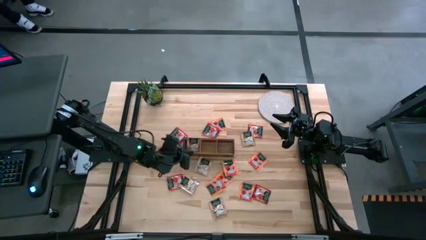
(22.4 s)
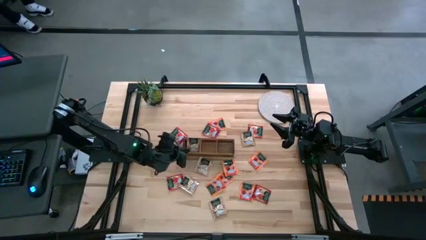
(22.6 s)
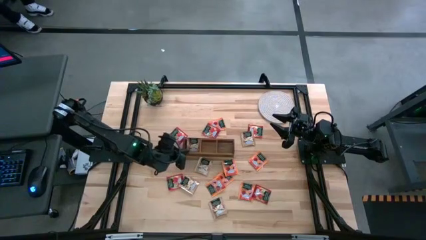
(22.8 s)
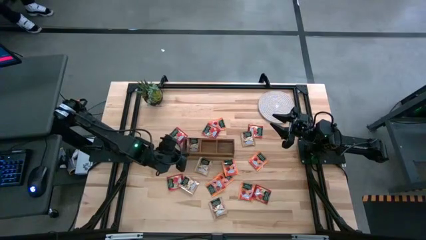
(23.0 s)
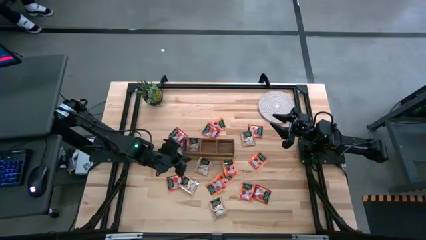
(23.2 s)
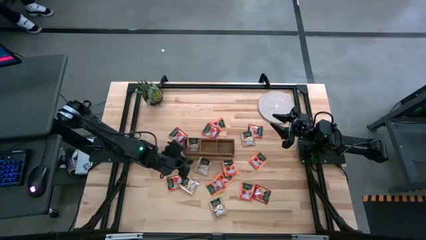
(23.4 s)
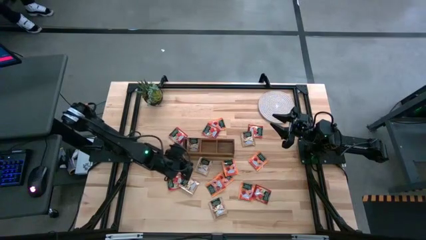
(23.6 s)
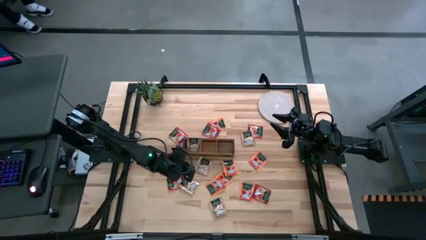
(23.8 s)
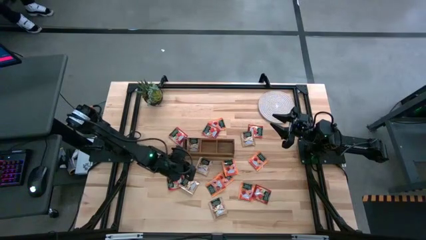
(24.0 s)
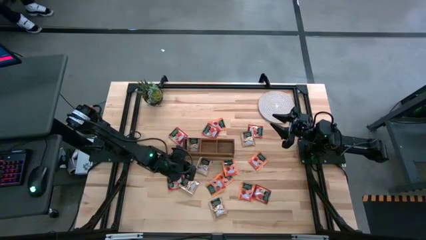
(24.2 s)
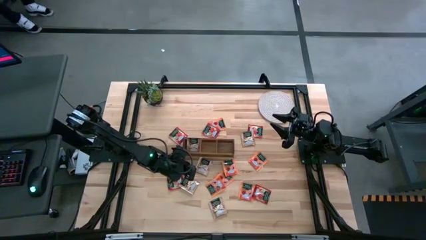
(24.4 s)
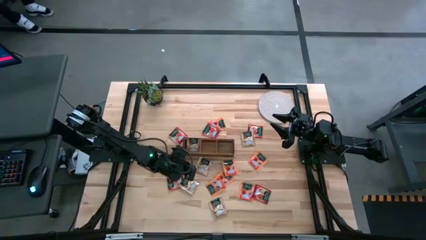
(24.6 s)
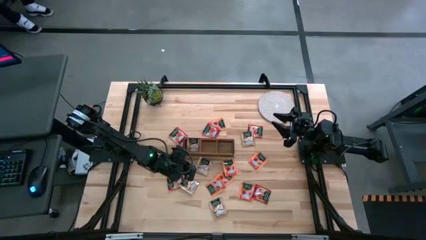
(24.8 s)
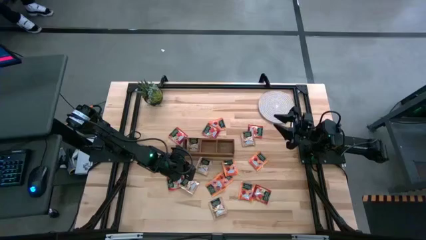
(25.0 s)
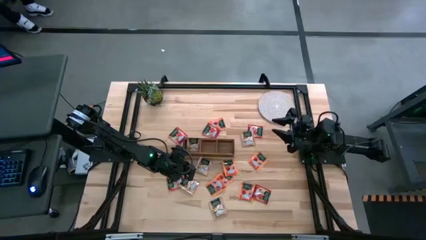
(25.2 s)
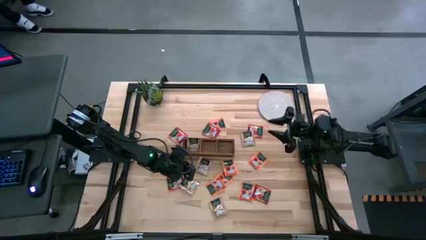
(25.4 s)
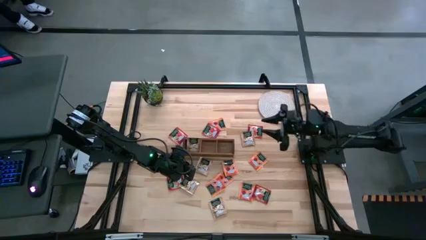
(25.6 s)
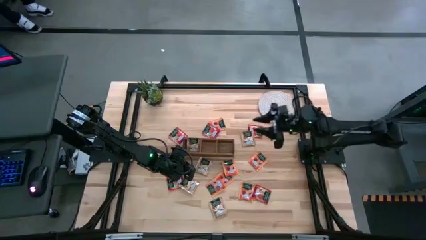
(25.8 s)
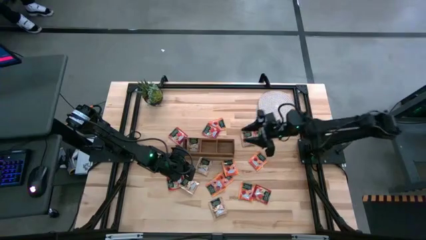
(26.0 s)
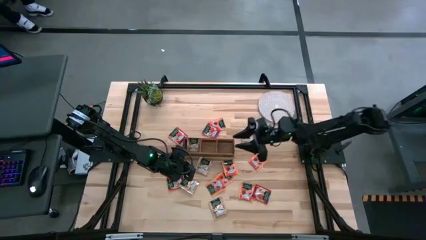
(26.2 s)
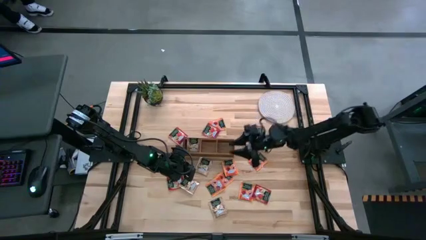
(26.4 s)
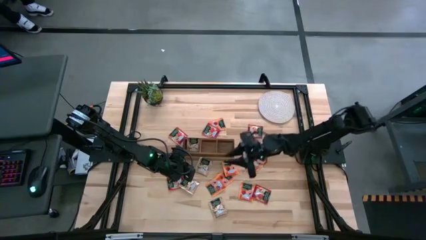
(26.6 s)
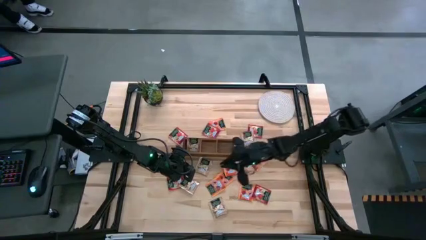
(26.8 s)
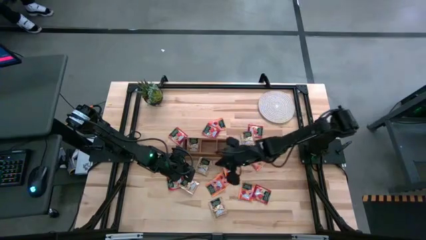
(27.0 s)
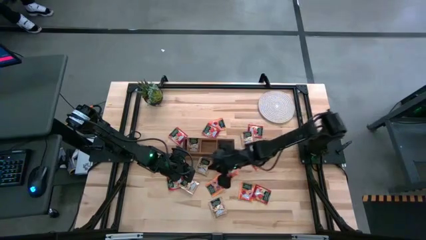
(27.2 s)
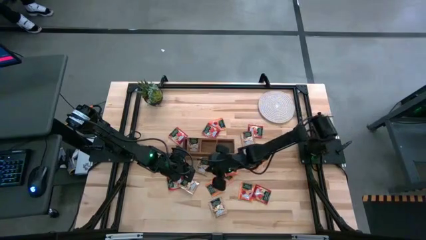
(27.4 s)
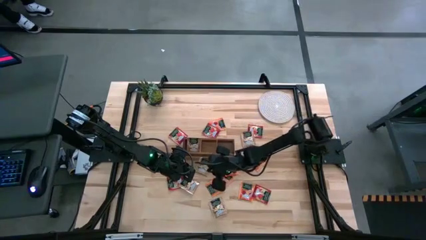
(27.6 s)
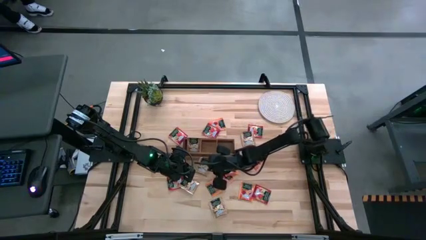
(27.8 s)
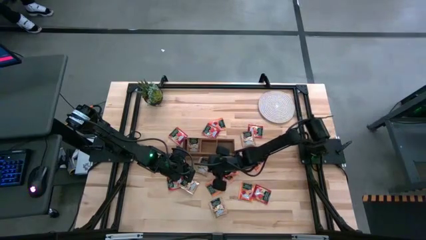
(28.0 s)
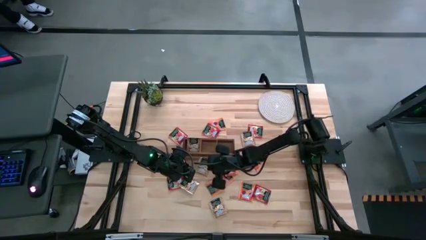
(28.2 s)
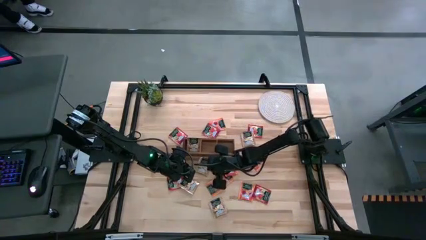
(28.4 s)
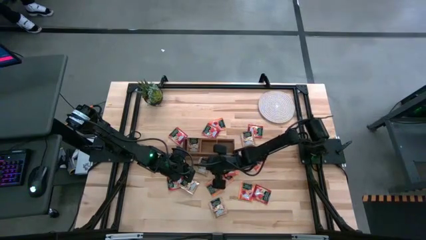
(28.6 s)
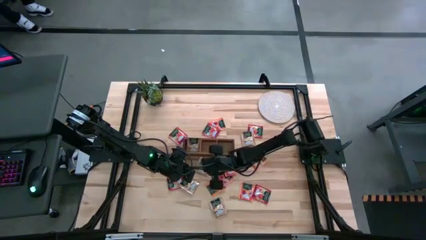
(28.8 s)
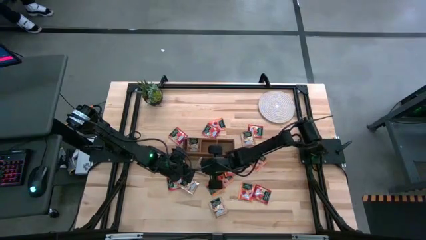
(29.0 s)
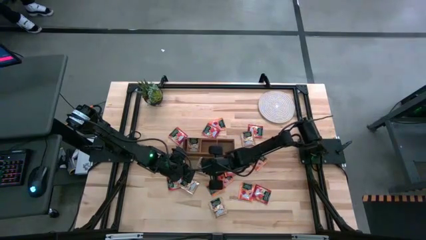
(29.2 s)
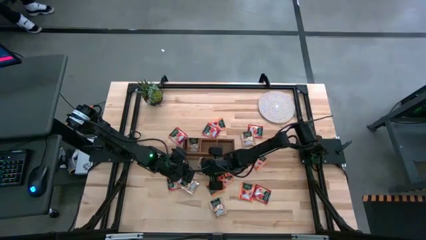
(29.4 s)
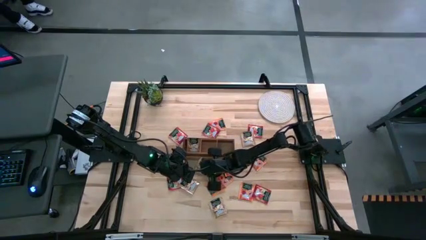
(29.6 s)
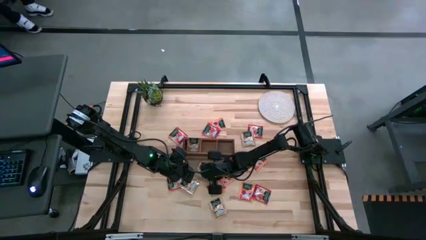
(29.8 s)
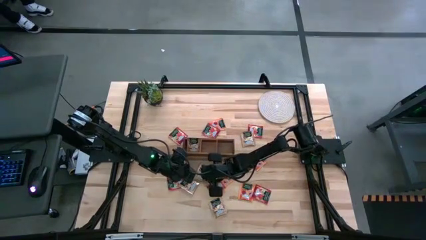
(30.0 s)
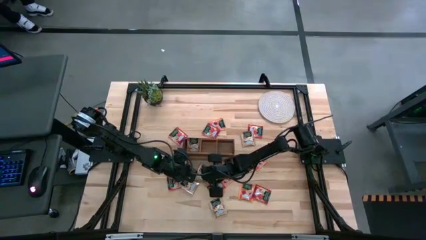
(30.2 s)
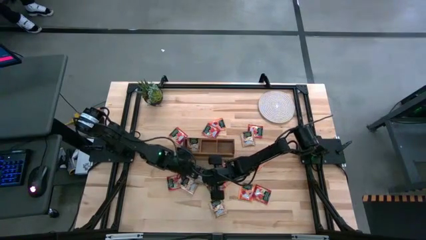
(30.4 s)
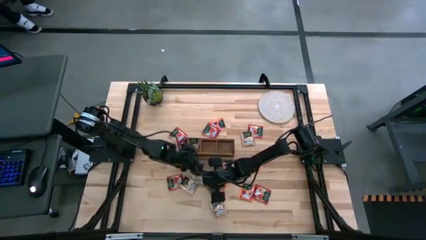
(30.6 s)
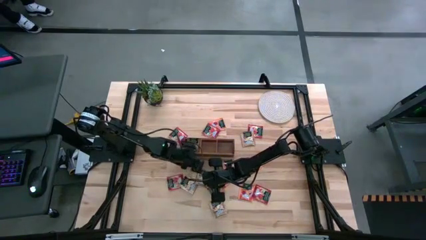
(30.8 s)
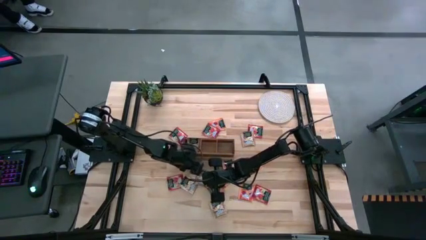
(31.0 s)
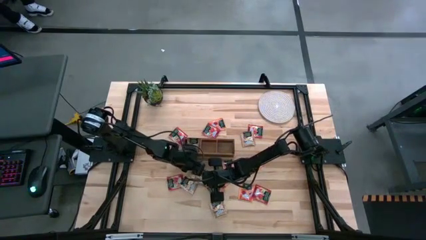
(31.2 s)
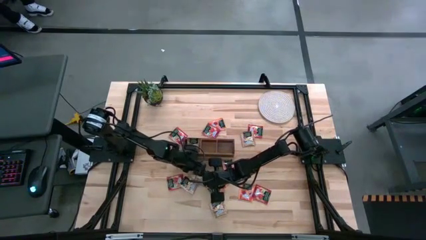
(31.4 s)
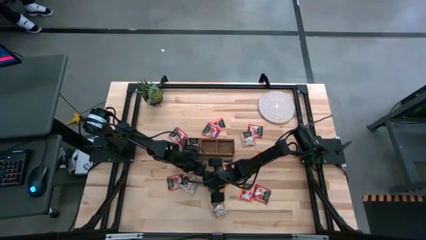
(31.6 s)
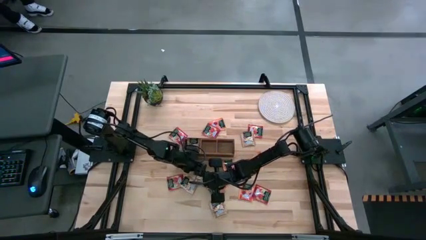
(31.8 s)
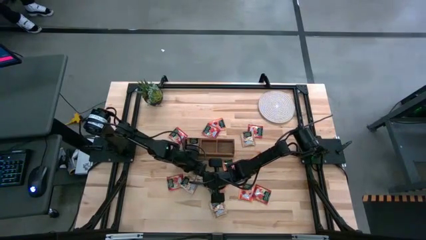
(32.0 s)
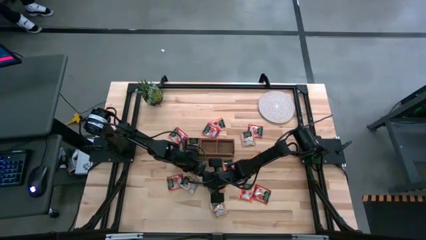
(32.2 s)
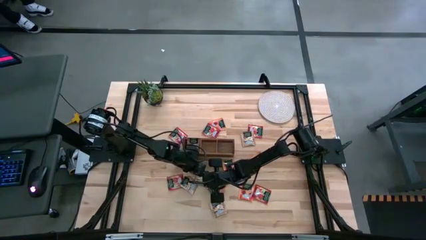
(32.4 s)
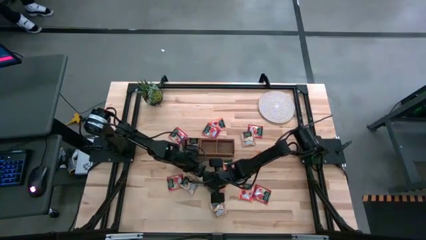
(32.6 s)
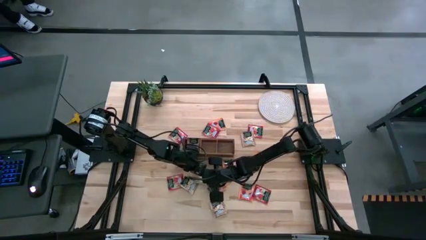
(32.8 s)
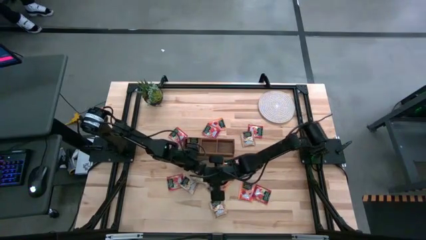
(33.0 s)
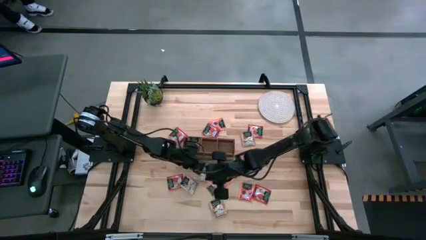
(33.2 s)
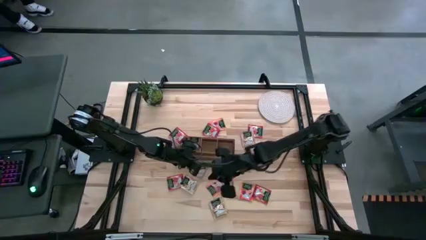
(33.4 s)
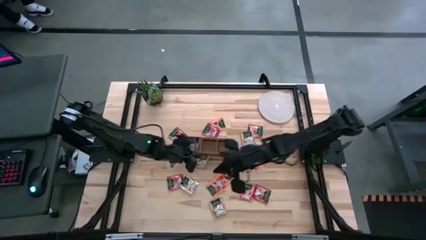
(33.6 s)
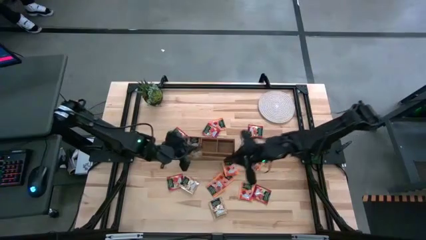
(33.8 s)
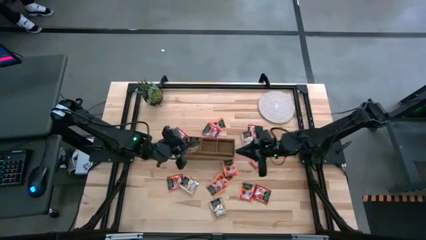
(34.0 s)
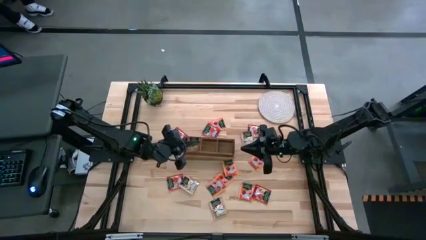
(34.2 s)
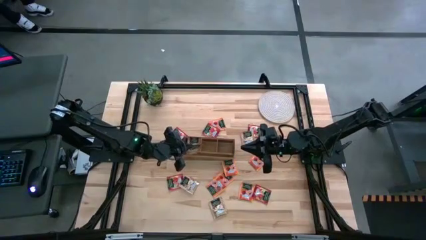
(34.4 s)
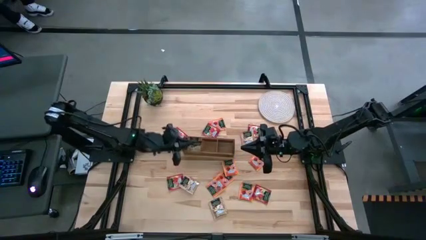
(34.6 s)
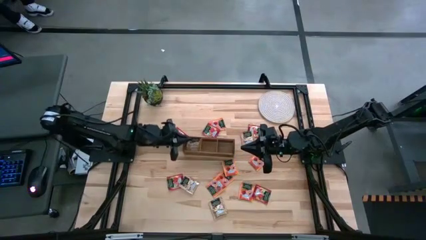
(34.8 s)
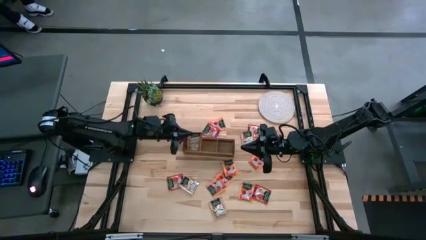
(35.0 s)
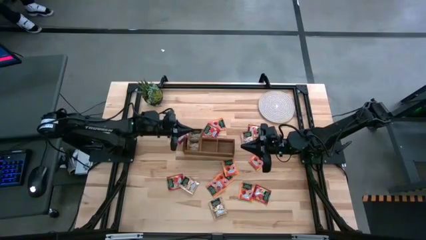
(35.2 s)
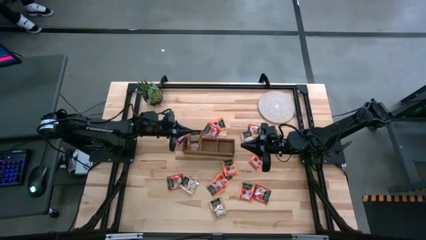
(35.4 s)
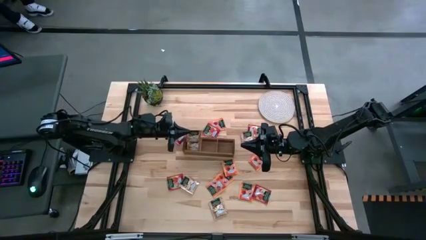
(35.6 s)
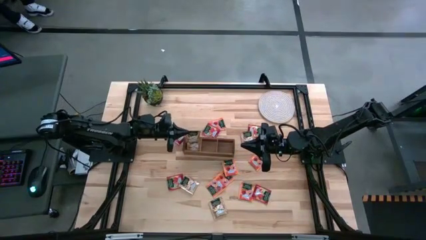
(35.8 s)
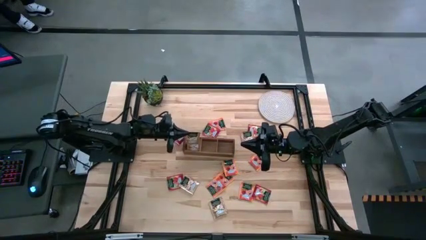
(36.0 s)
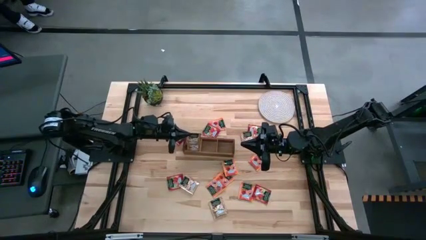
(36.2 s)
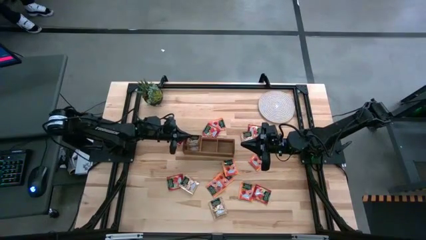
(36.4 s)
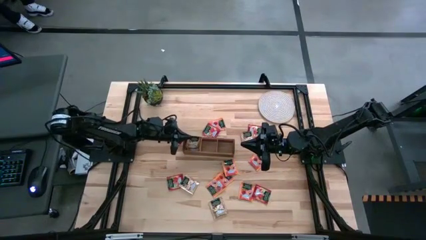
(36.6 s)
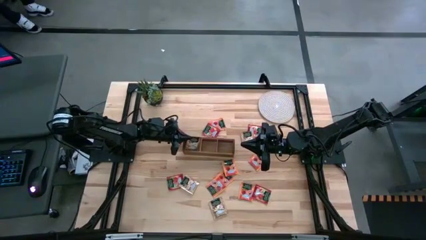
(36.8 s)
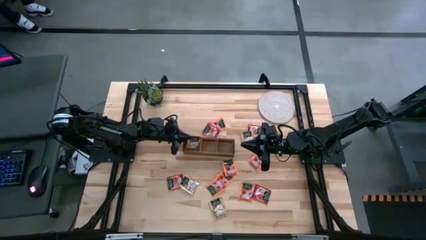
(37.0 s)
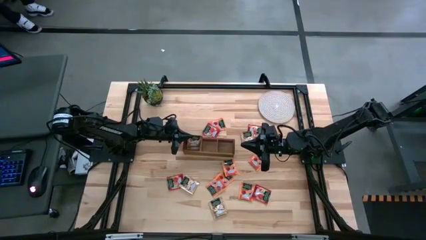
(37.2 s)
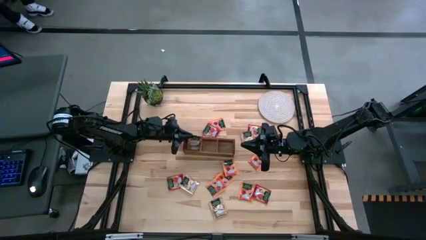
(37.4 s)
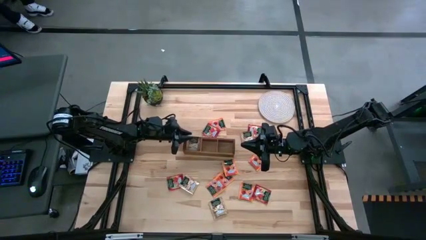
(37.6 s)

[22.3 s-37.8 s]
Task: Pick & Place Tea
Put the brown tea bag into the left section of the brown wooden organizer
